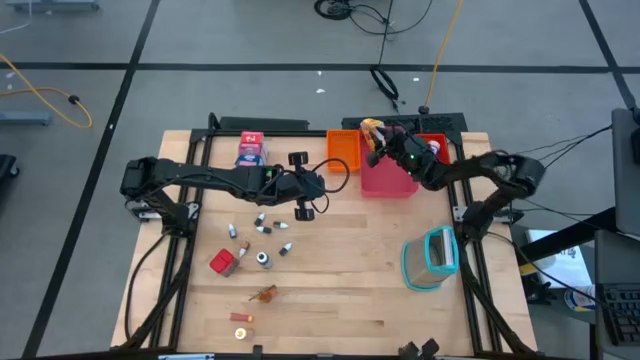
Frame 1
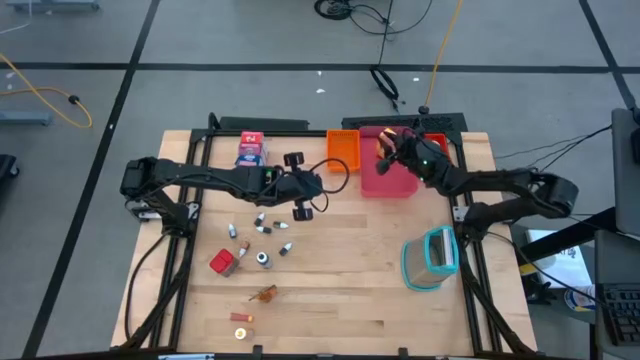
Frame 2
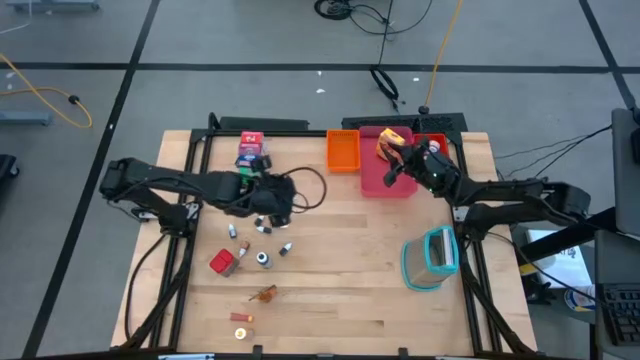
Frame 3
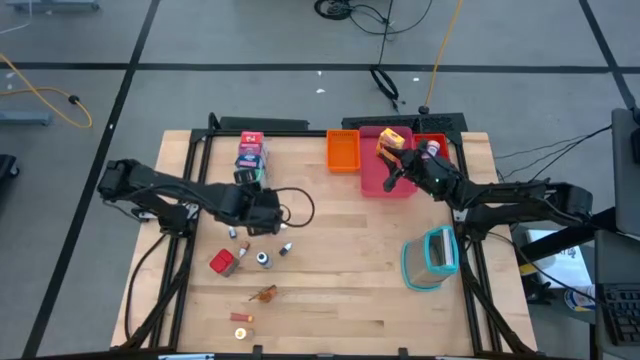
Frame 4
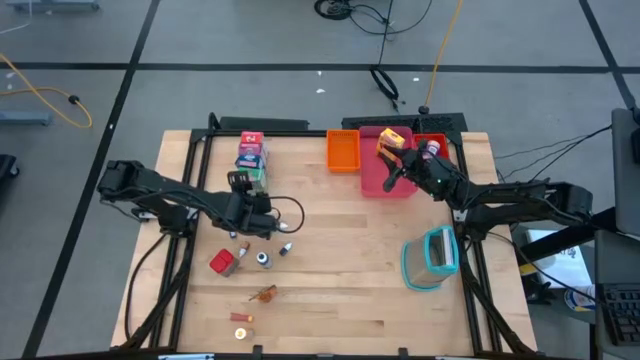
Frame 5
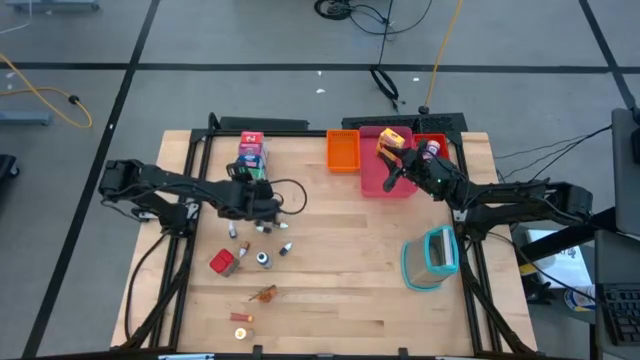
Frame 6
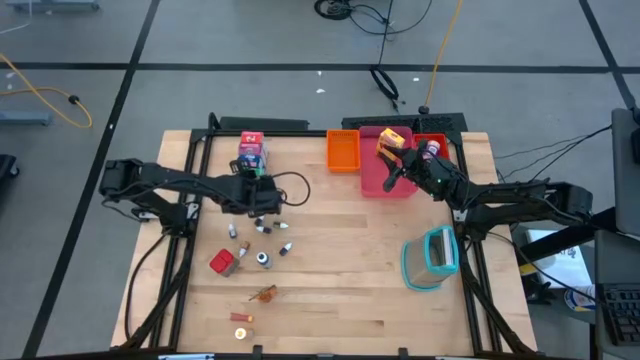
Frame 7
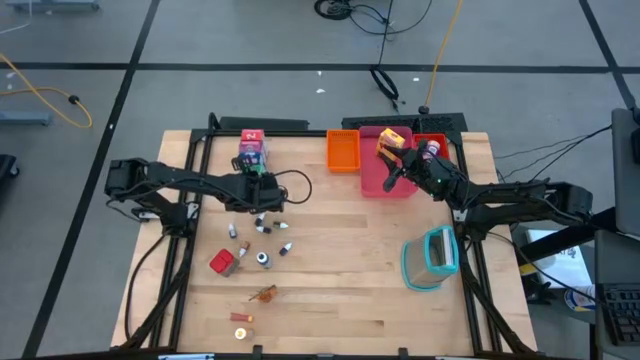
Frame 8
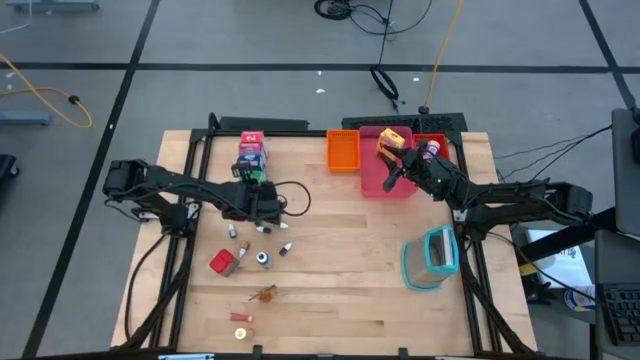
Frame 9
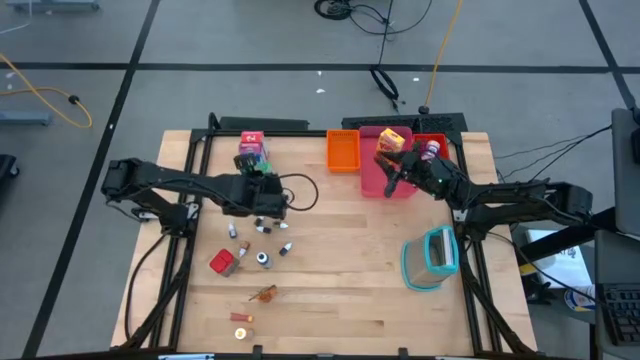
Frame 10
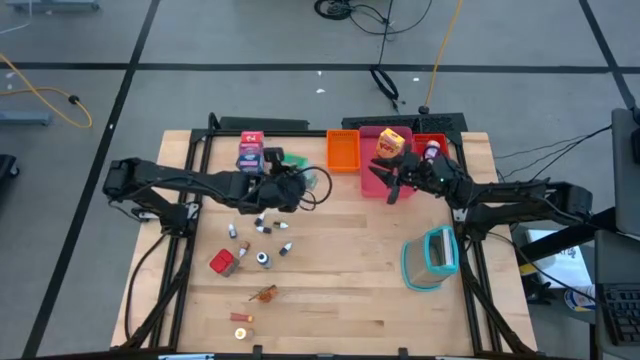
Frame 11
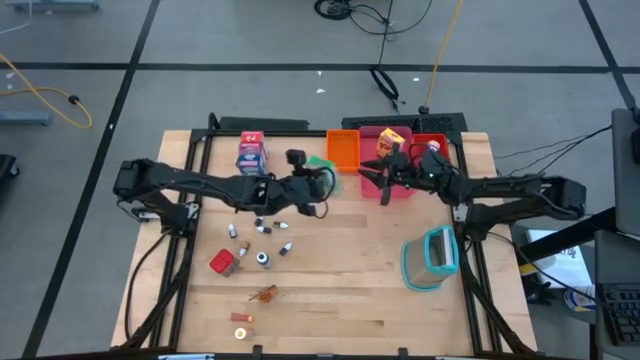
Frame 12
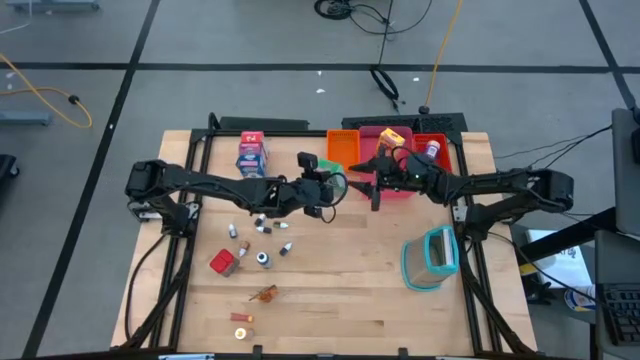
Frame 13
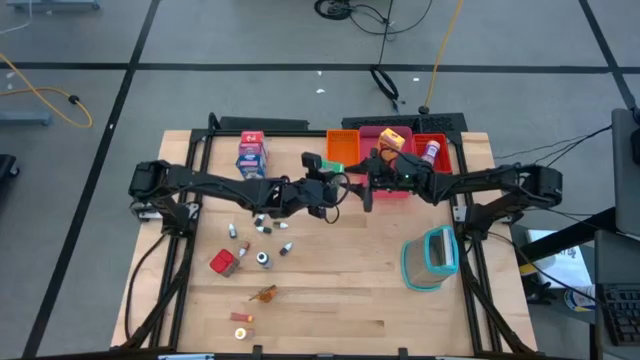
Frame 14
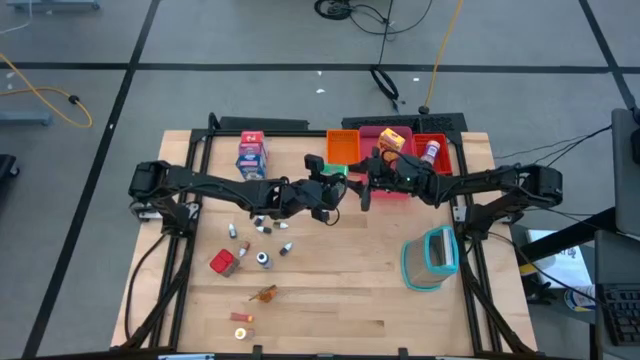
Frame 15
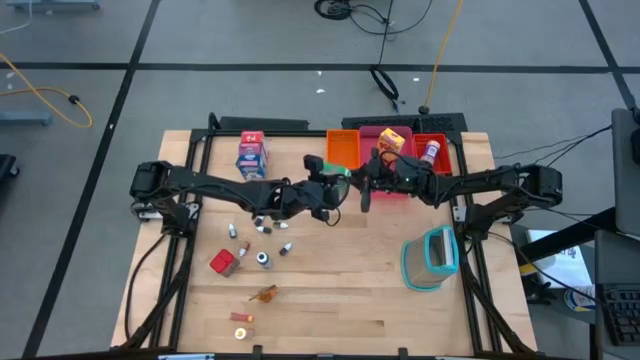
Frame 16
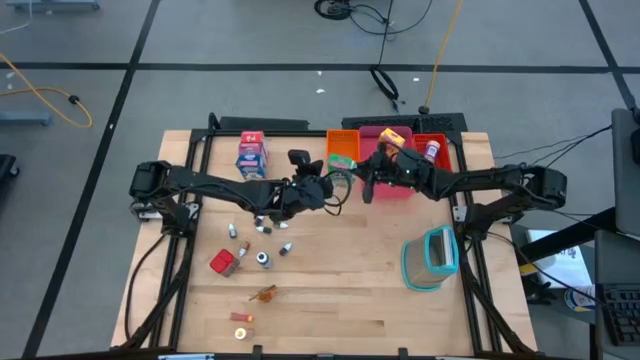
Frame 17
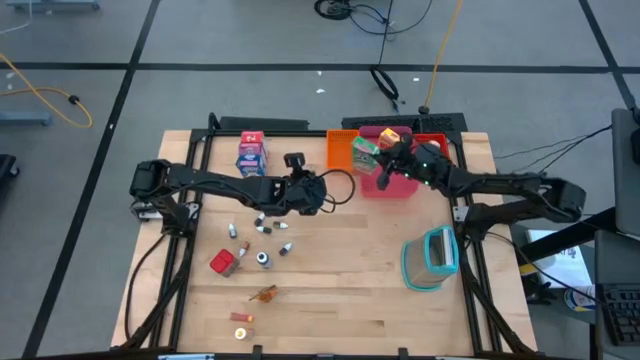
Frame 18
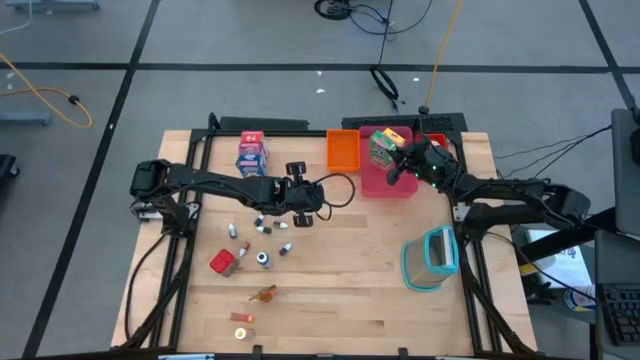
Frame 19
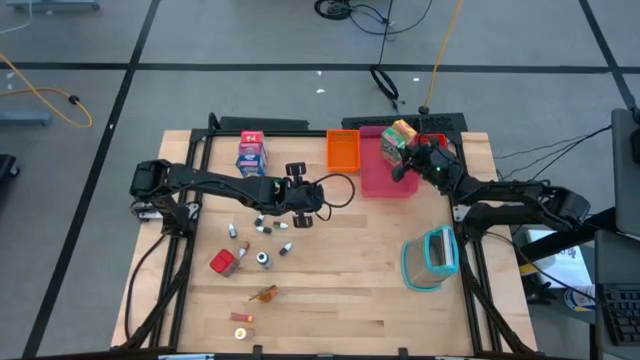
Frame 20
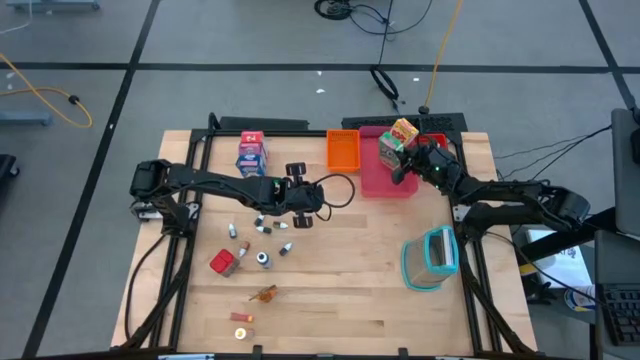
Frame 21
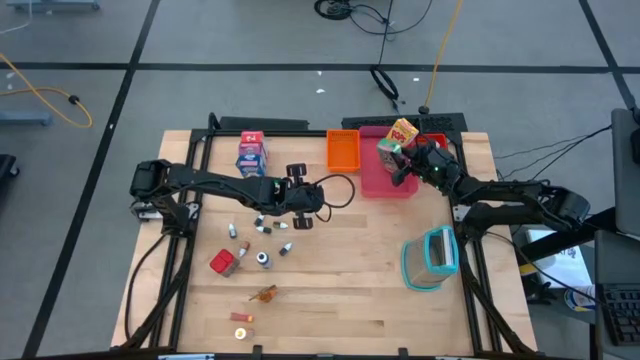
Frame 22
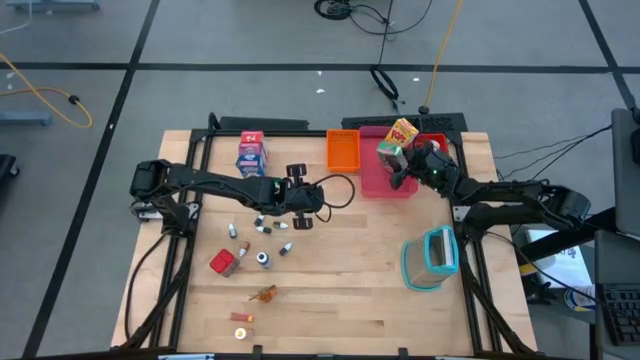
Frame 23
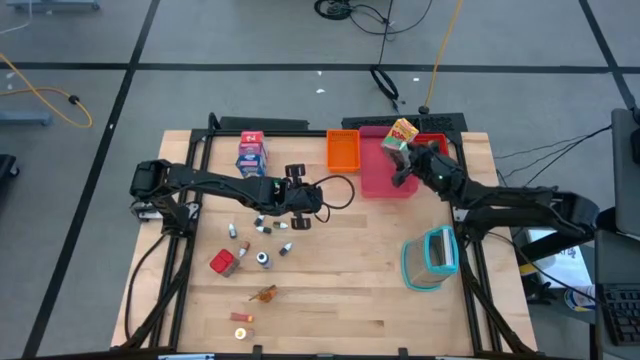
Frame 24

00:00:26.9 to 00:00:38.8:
Task: Pick & Place Kitchen Items
Put the green cereal box into the pink bin

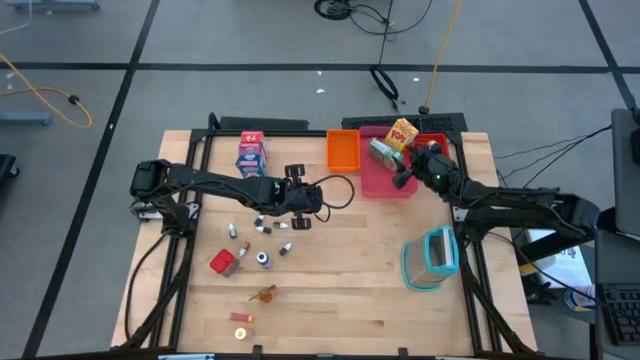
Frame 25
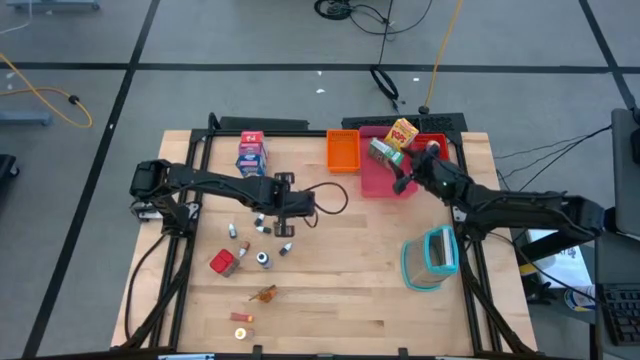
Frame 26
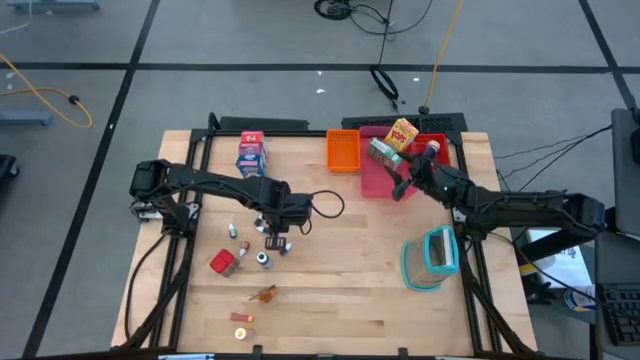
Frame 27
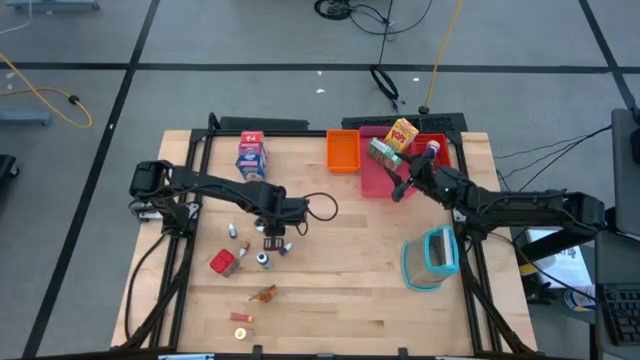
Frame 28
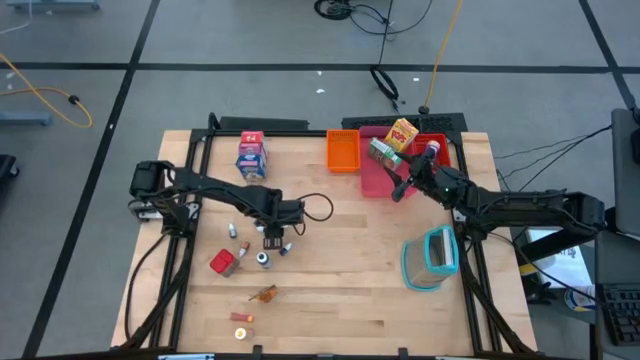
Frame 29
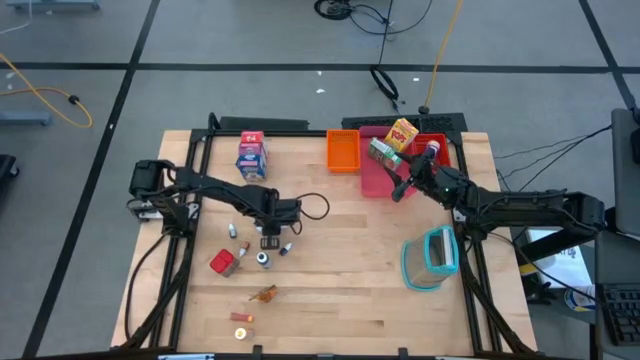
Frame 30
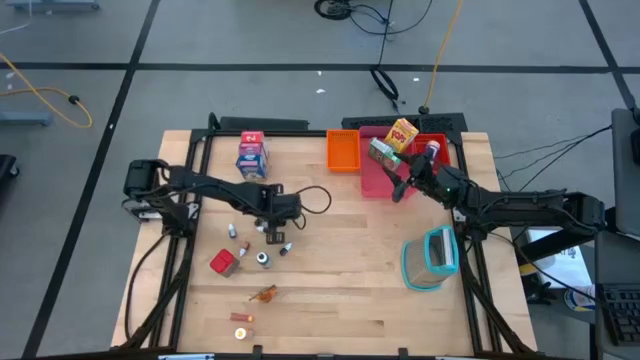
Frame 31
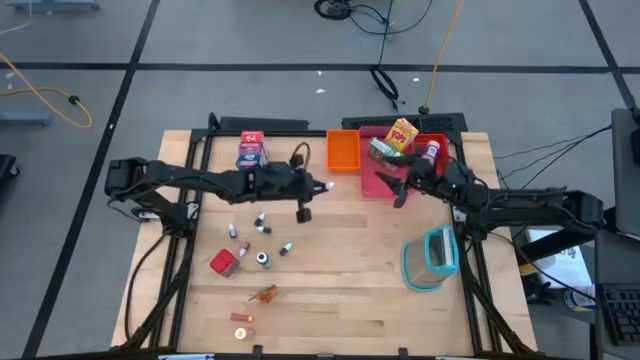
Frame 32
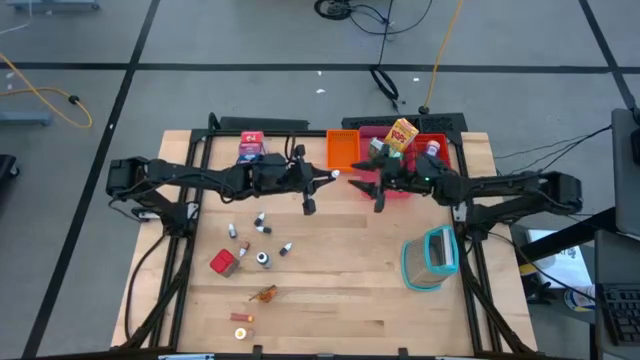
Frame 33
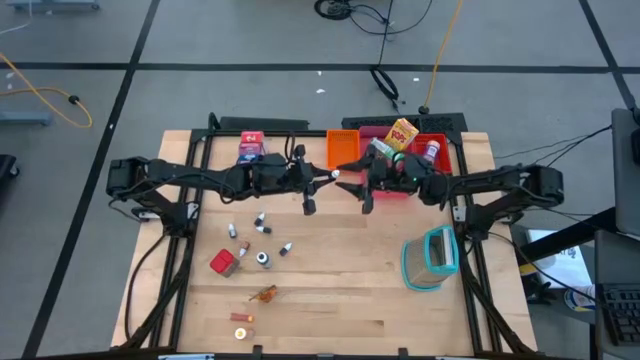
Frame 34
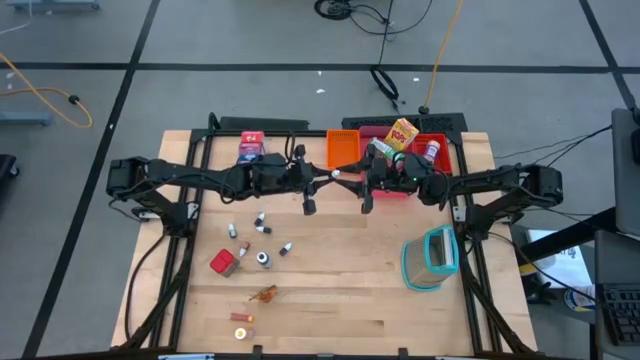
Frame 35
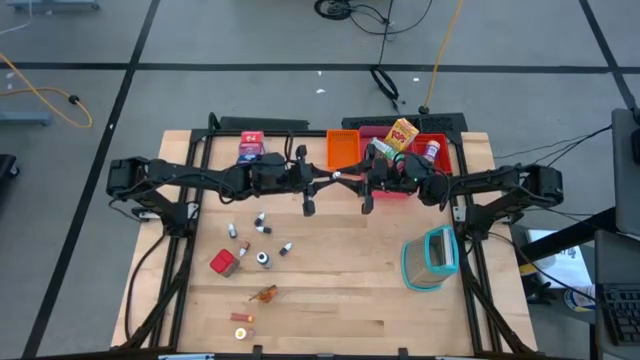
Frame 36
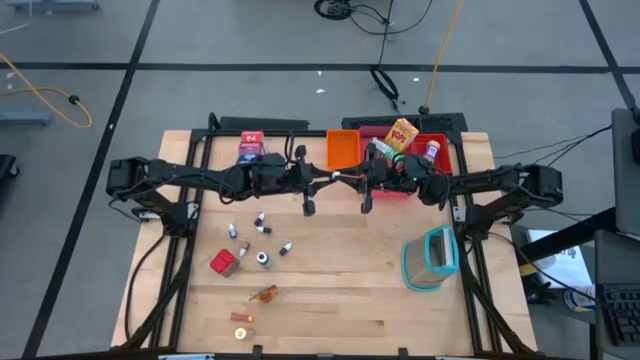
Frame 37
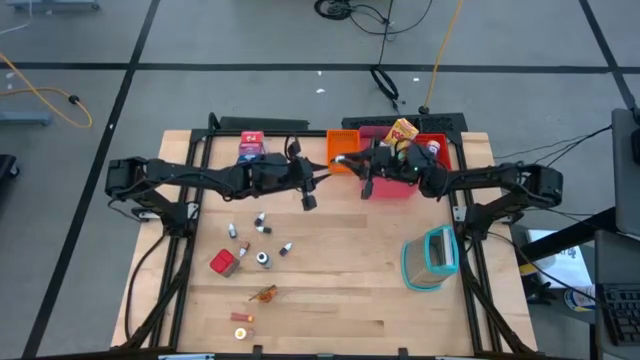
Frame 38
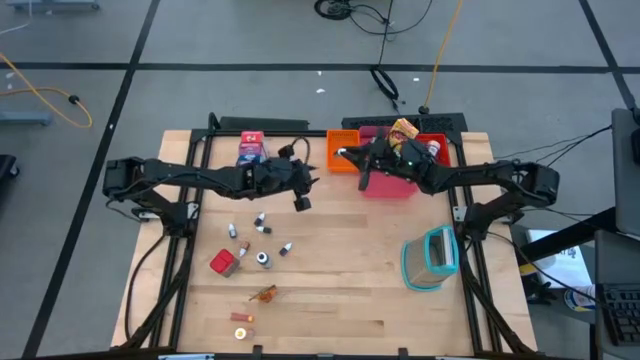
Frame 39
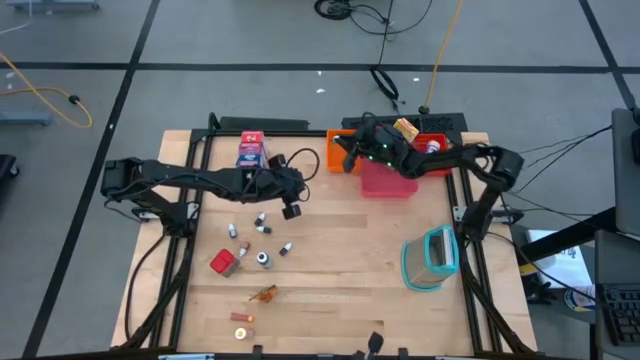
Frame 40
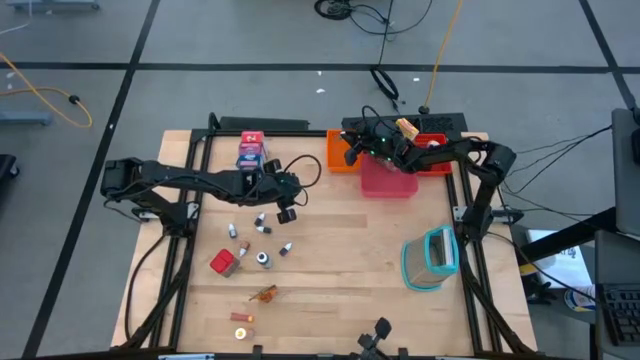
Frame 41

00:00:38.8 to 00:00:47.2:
Put the small green food coloring bottle into the orange bin

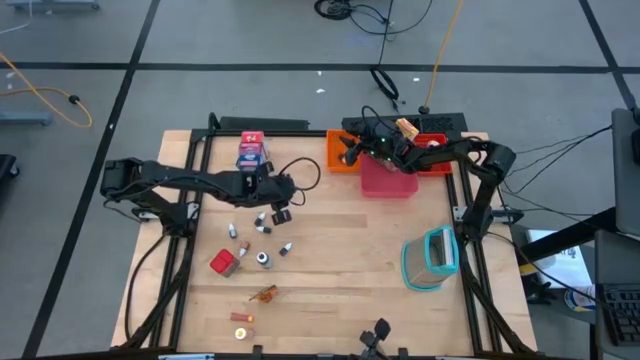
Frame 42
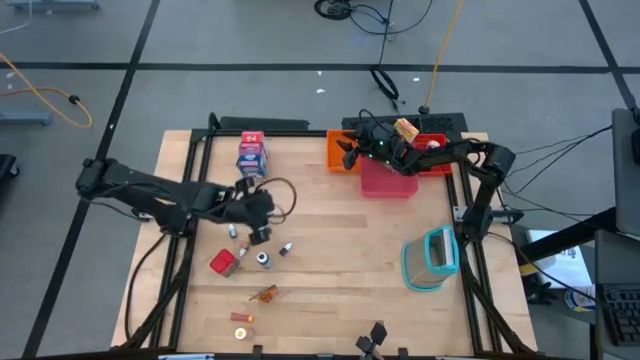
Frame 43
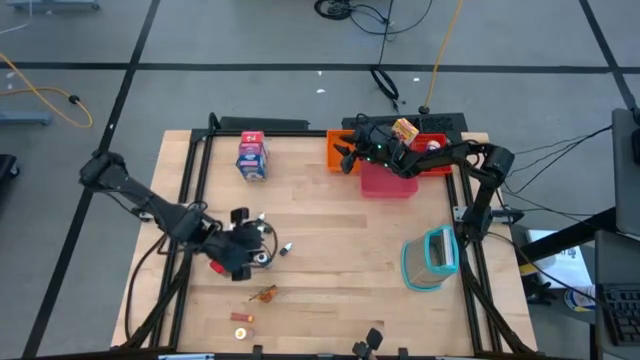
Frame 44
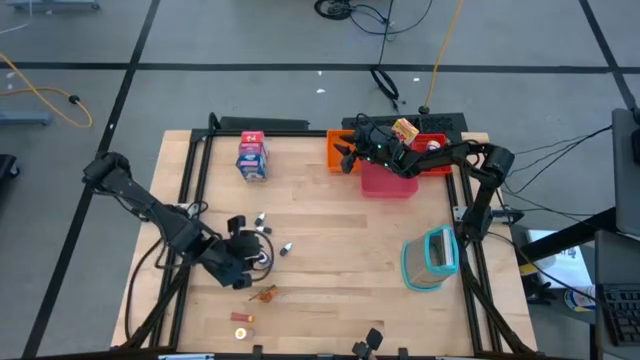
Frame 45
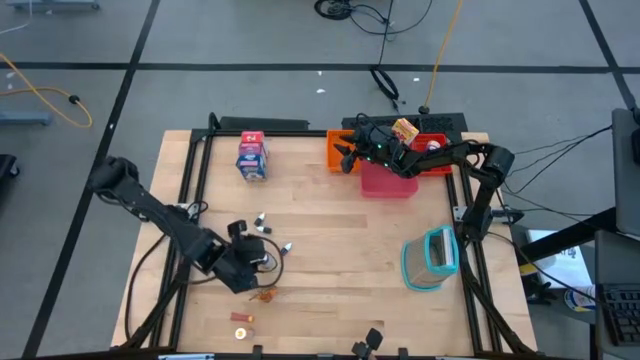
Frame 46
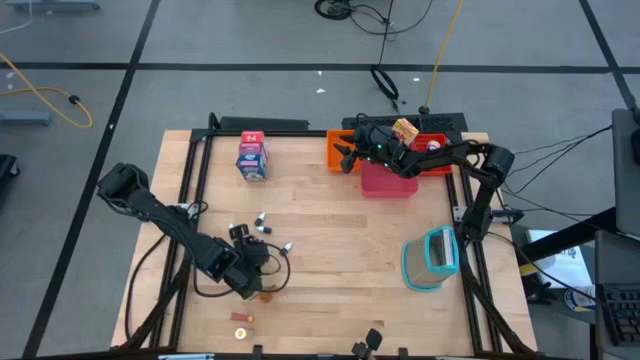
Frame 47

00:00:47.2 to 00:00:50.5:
Put the large black food coloring bottle into the orange bin
